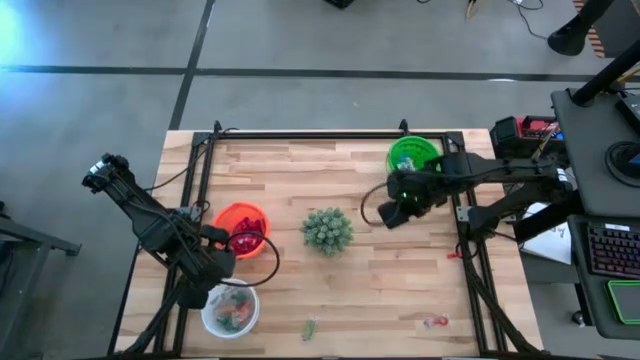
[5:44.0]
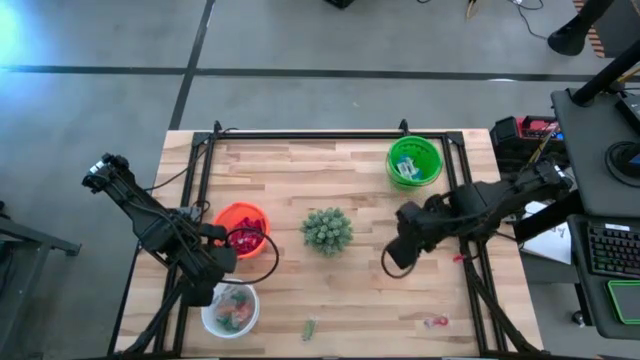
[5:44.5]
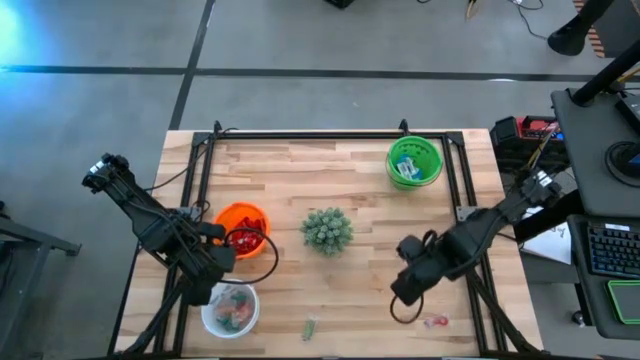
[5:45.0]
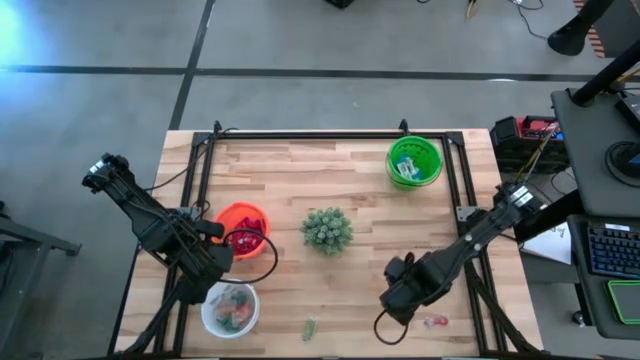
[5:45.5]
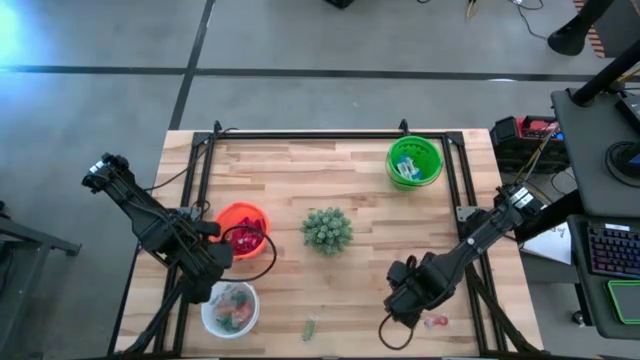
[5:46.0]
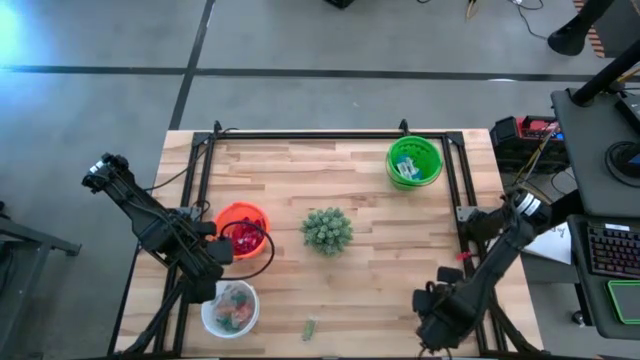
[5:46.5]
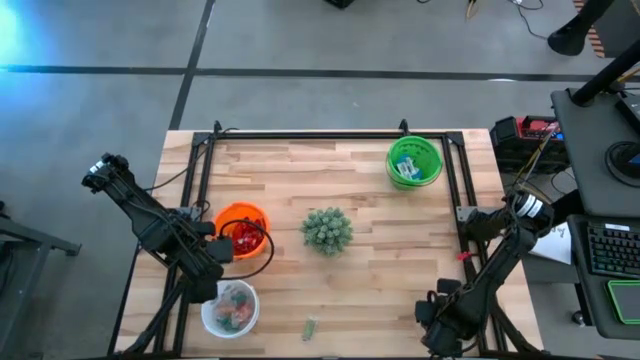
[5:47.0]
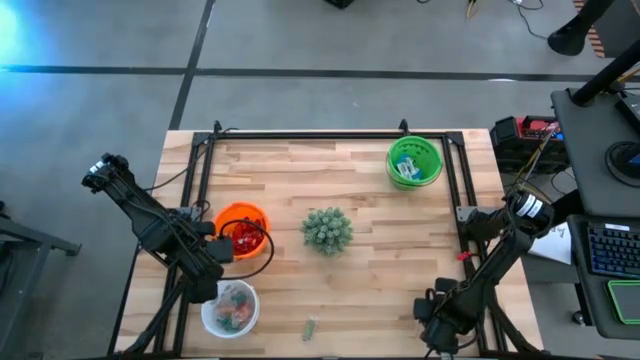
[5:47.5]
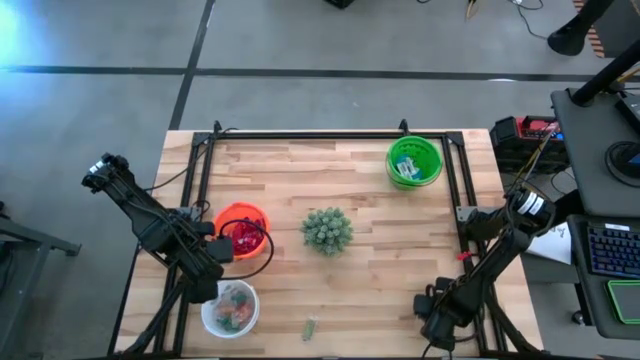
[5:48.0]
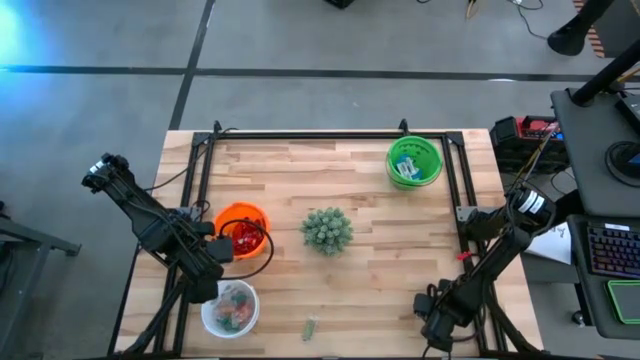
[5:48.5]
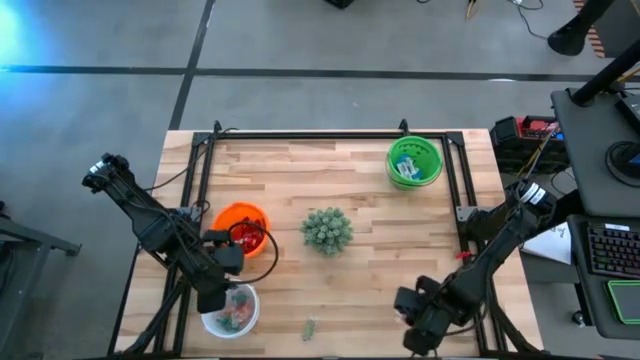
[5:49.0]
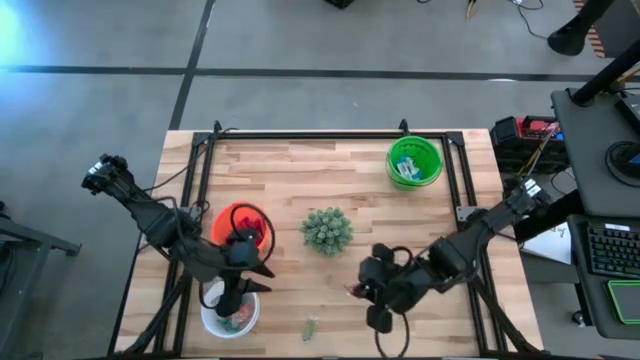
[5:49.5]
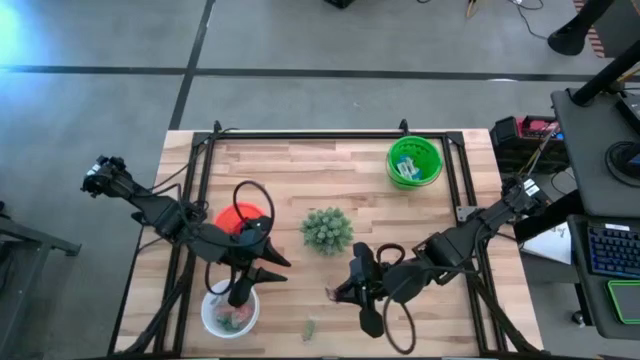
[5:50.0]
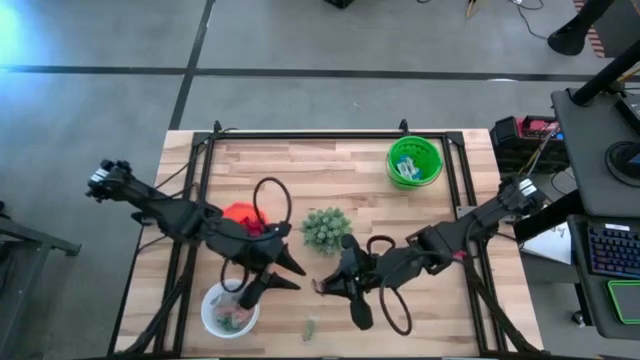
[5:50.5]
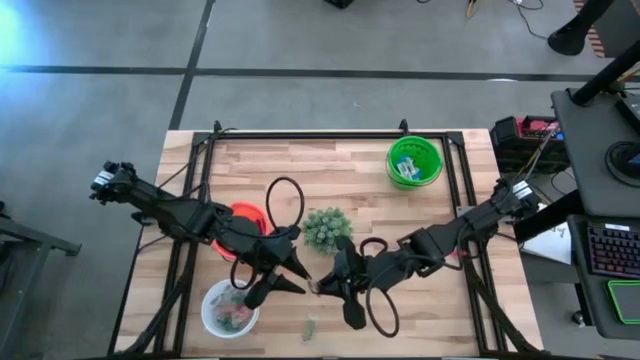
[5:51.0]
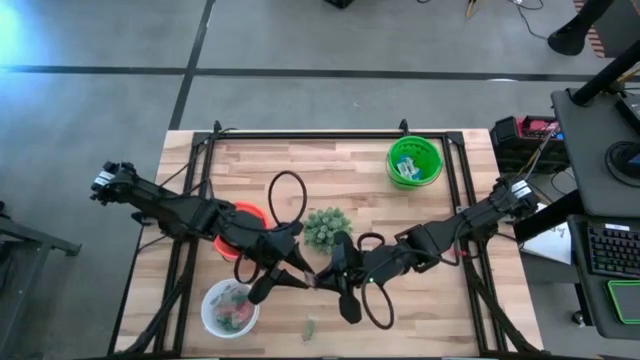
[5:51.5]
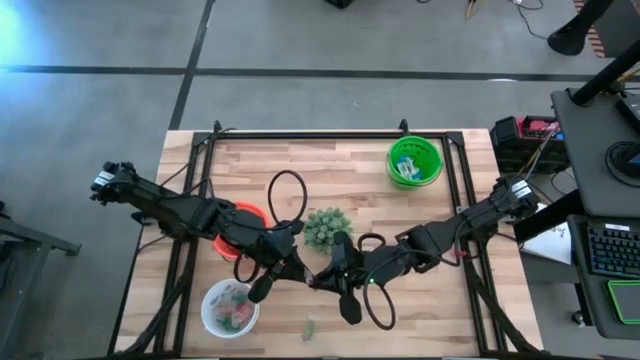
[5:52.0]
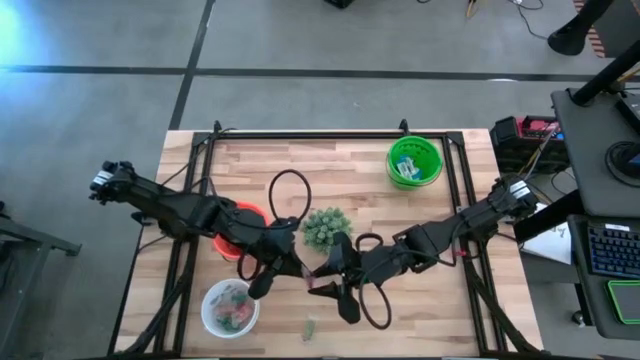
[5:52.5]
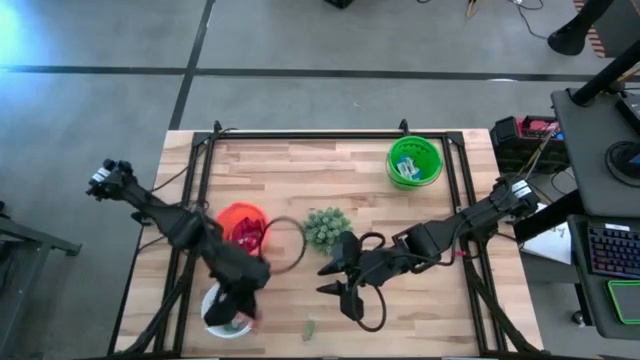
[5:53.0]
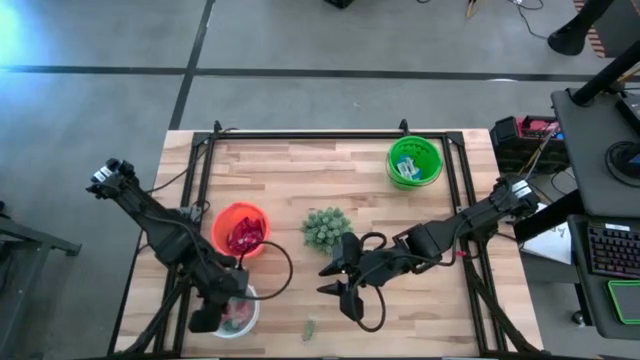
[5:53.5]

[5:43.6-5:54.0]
Task: Sort candy
Put the orange gummy into the white bucket

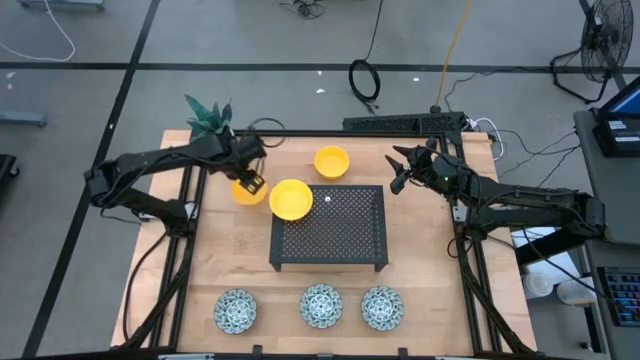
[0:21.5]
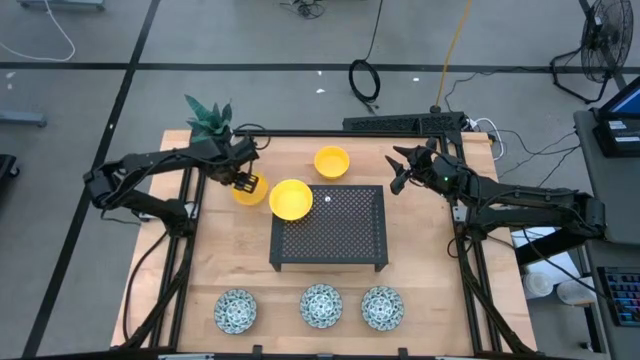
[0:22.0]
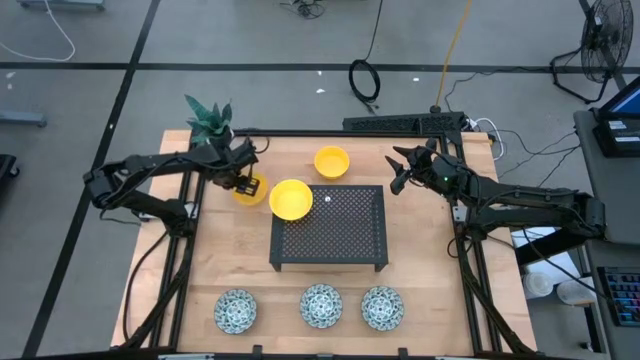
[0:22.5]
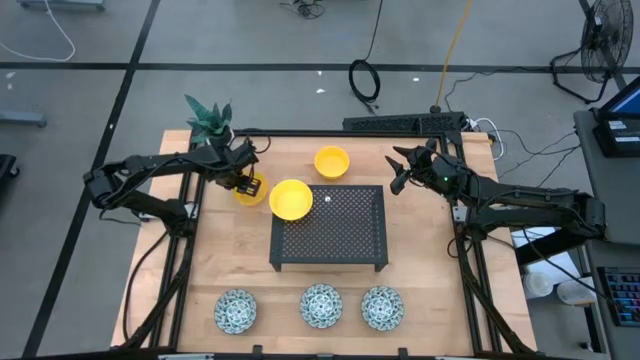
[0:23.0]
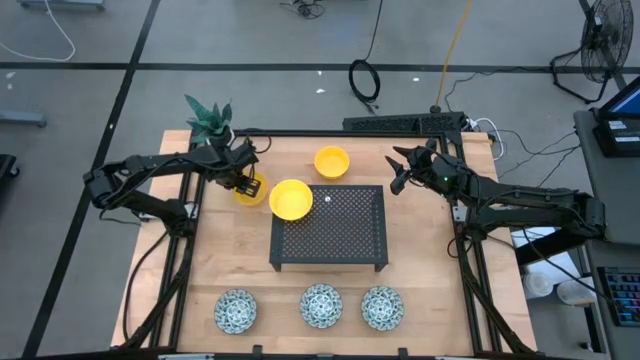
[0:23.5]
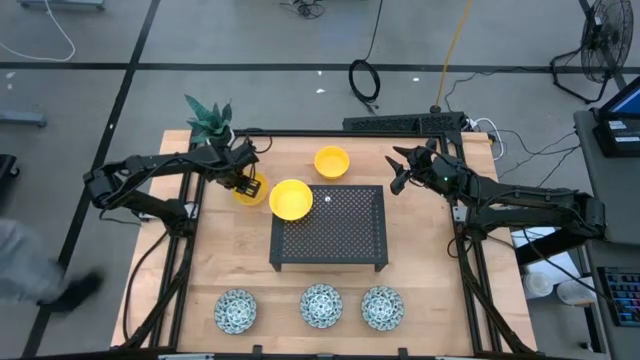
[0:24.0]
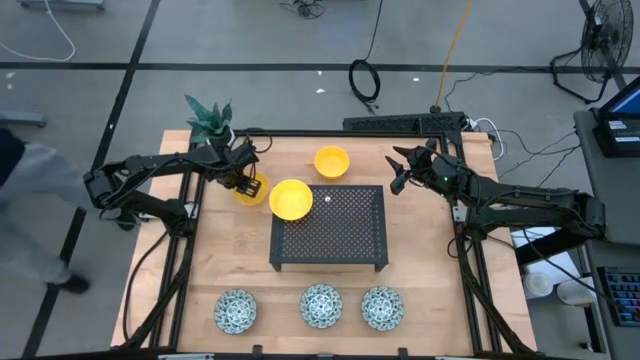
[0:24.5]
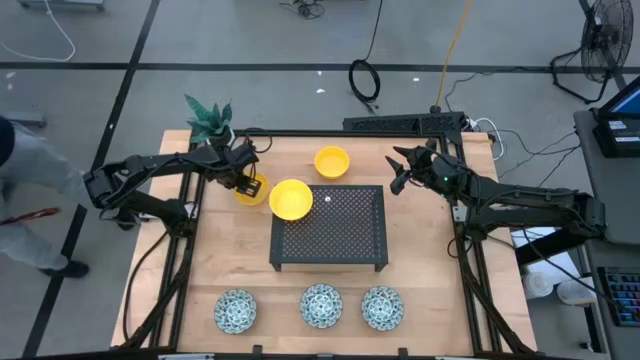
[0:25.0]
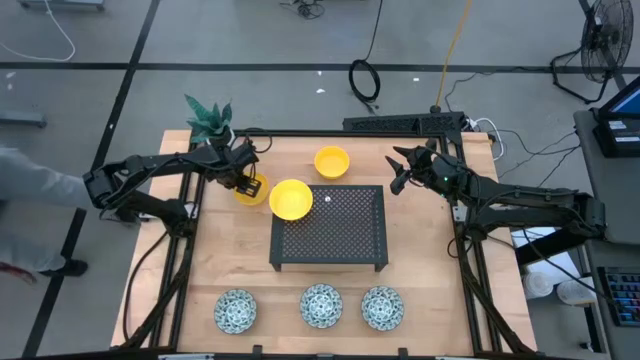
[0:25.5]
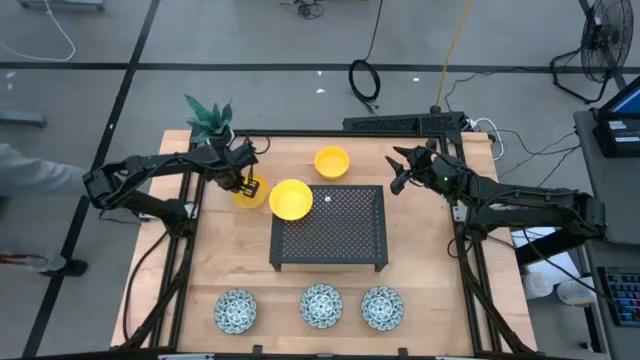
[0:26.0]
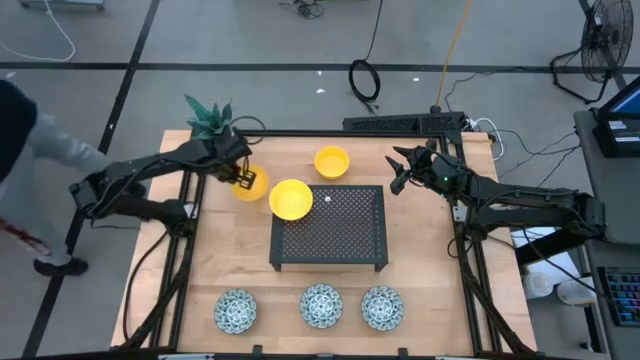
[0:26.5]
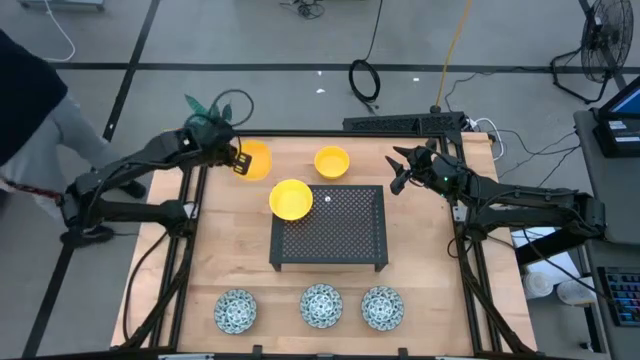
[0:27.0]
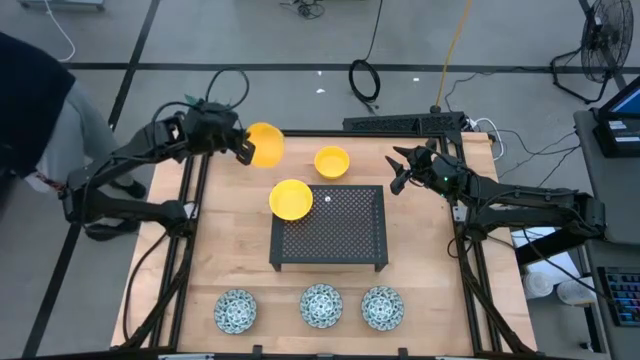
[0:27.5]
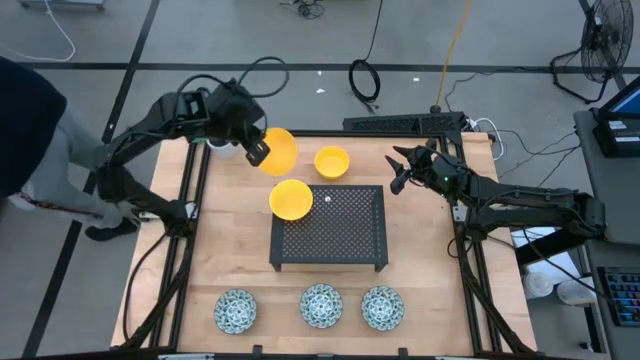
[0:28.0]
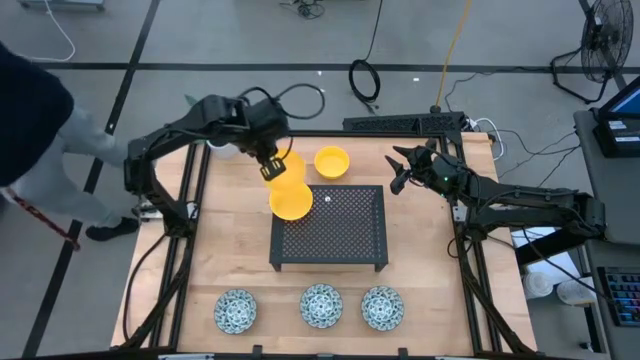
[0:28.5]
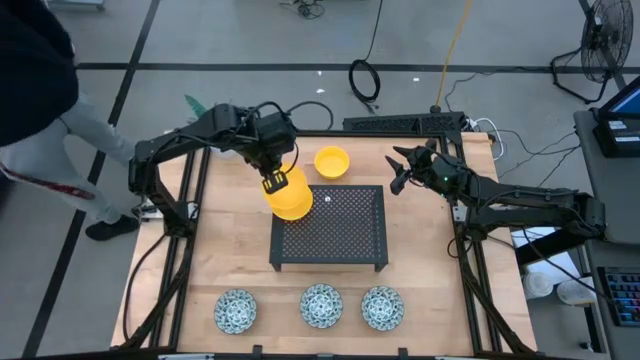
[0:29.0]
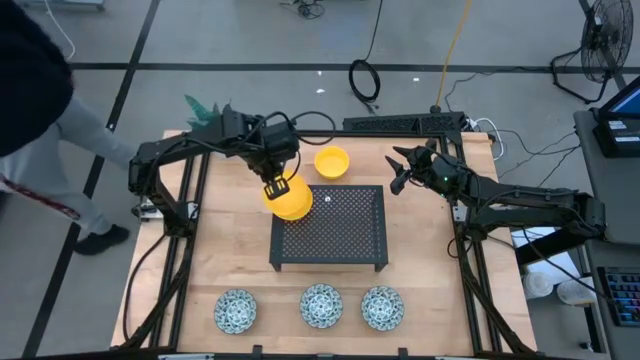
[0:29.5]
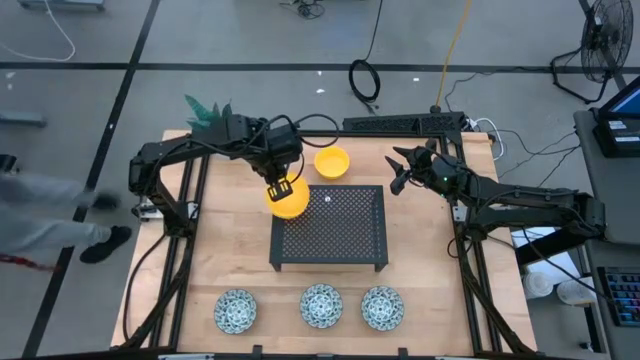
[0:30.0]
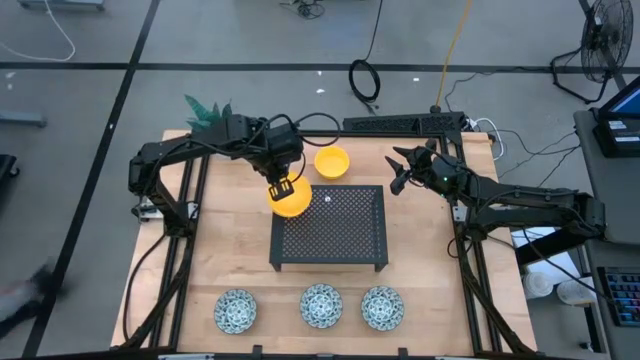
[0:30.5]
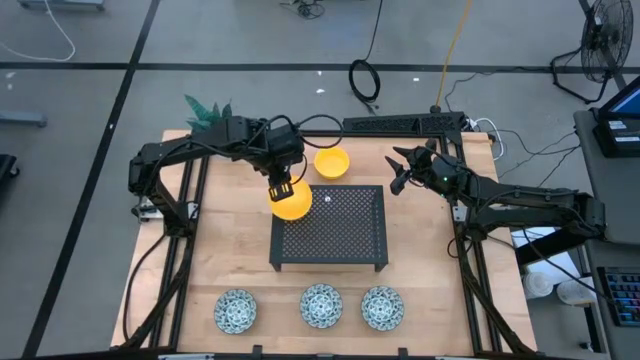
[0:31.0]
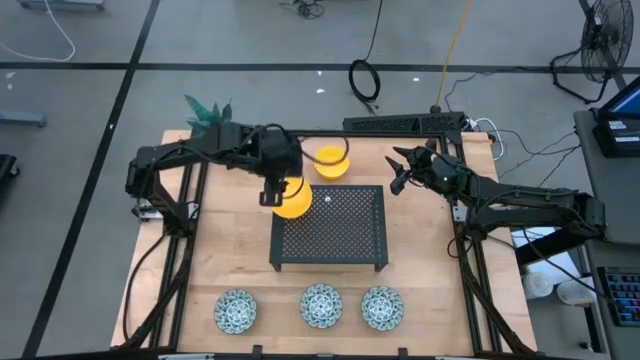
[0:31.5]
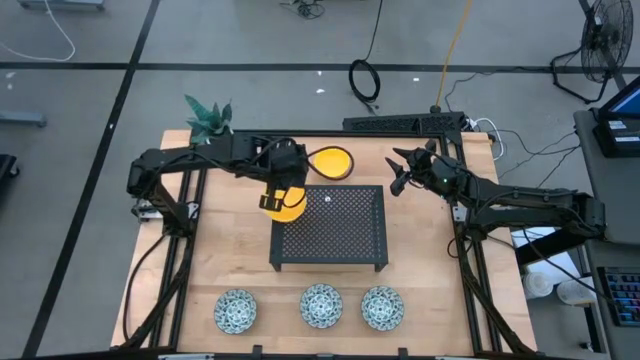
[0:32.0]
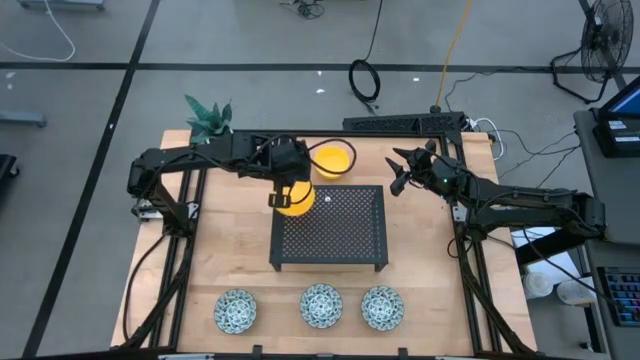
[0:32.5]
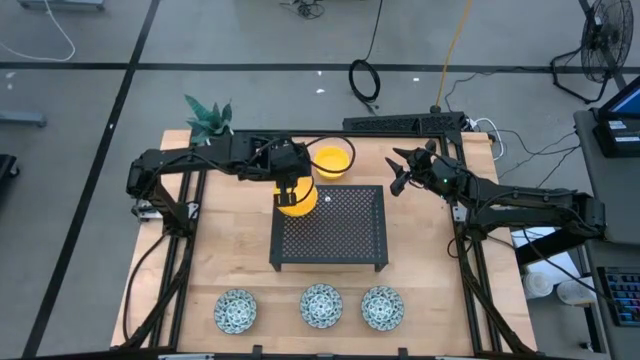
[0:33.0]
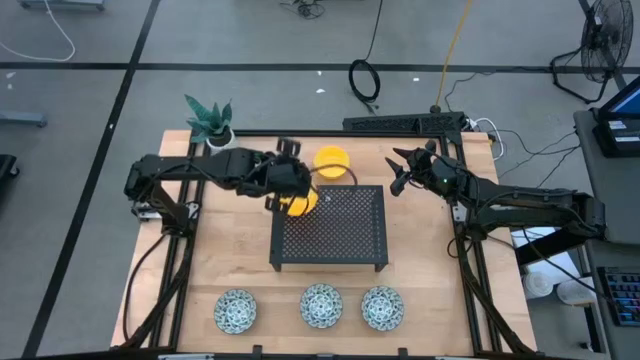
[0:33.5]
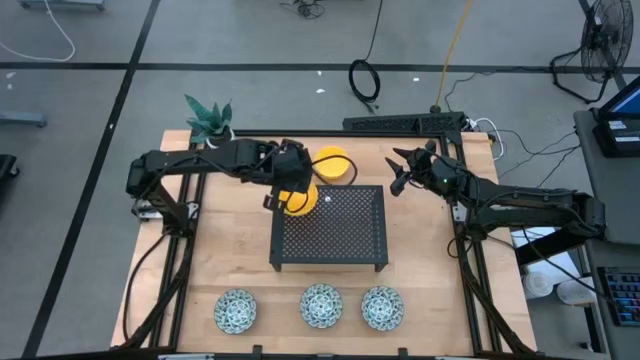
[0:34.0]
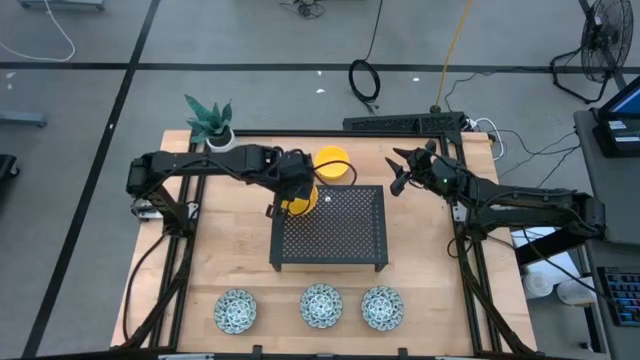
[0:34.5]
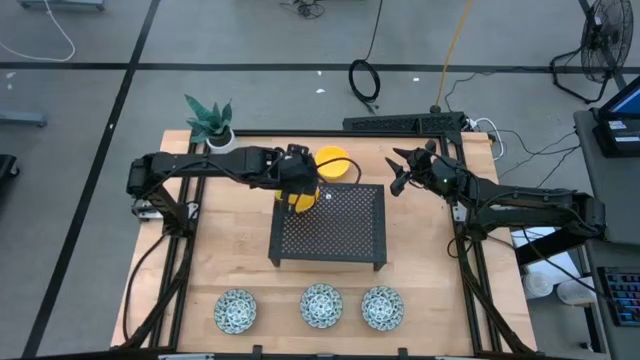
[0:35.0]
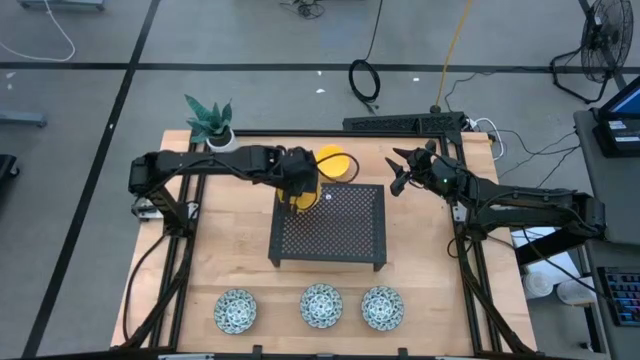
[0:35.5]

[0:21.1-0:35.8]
Task: Pick & Place Mini bowls
Stack the left yellow bowl on top of the yellow bowl on the shelf
